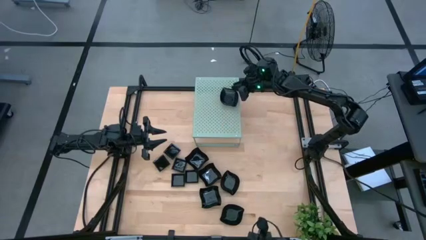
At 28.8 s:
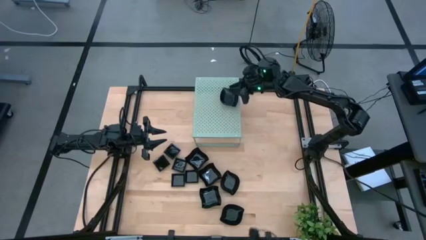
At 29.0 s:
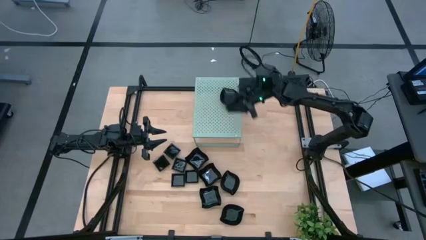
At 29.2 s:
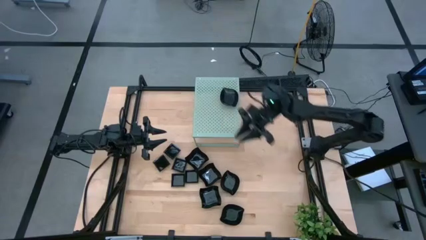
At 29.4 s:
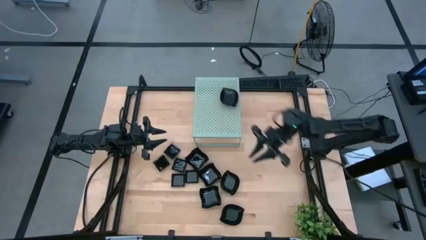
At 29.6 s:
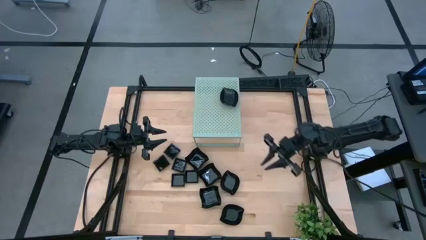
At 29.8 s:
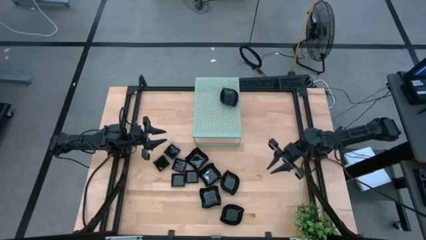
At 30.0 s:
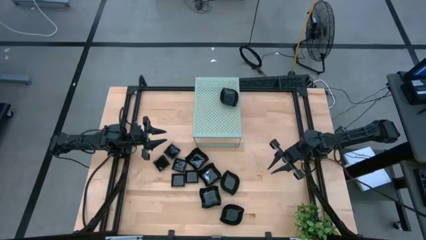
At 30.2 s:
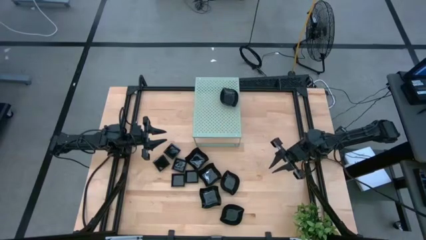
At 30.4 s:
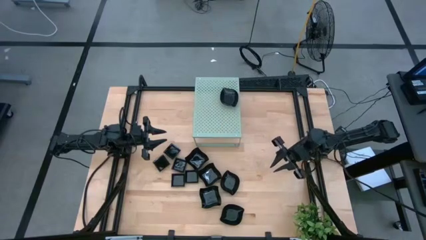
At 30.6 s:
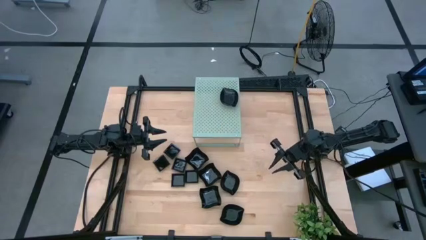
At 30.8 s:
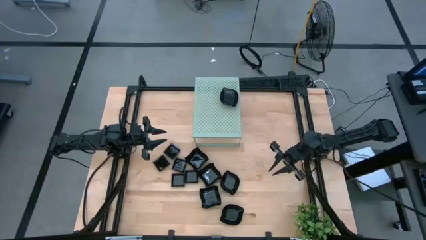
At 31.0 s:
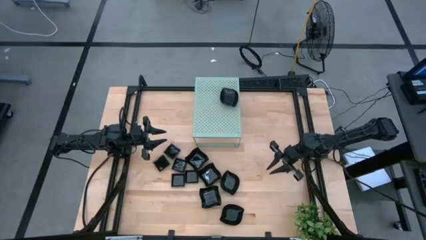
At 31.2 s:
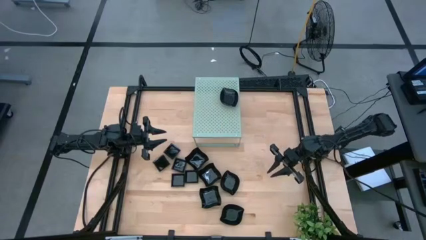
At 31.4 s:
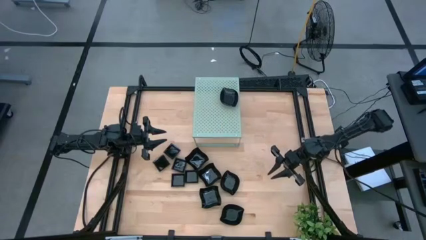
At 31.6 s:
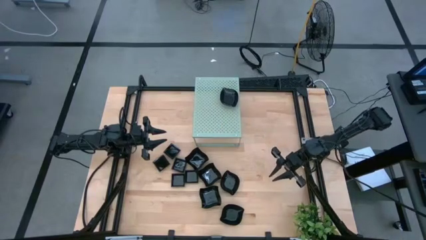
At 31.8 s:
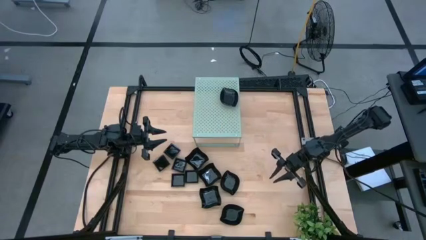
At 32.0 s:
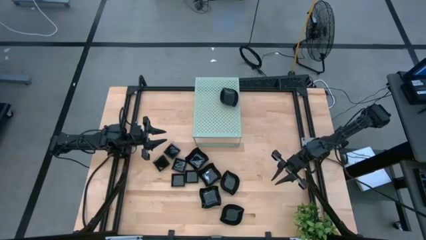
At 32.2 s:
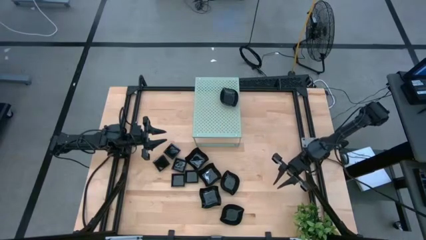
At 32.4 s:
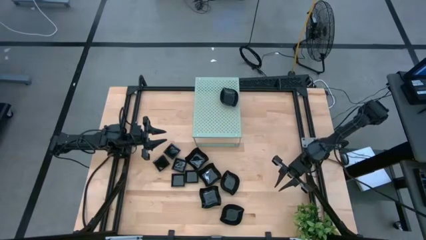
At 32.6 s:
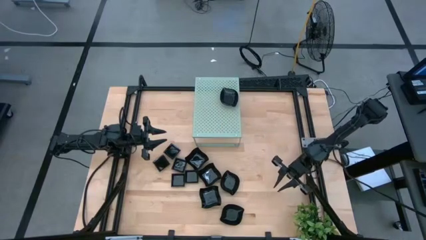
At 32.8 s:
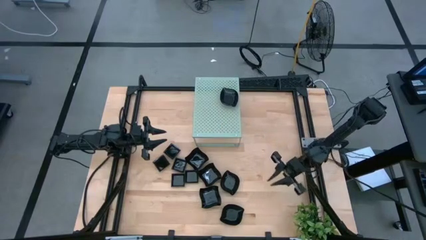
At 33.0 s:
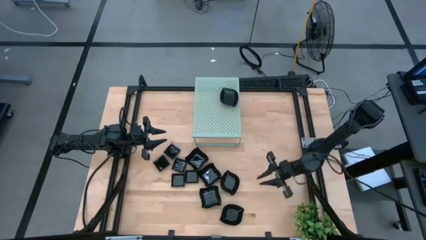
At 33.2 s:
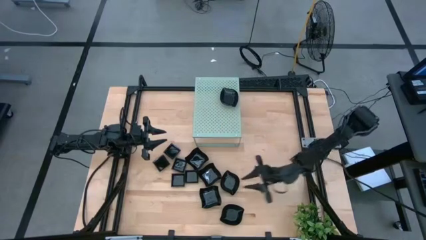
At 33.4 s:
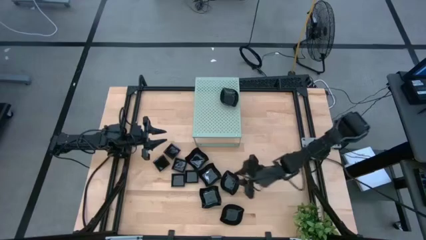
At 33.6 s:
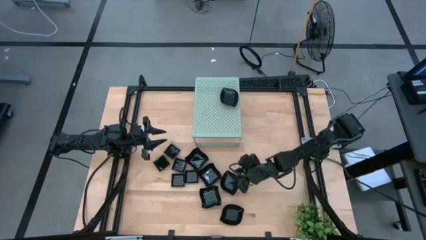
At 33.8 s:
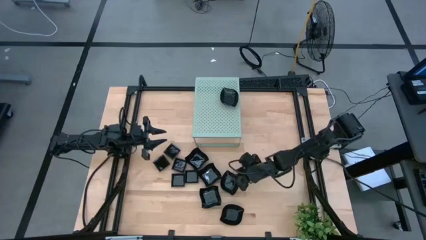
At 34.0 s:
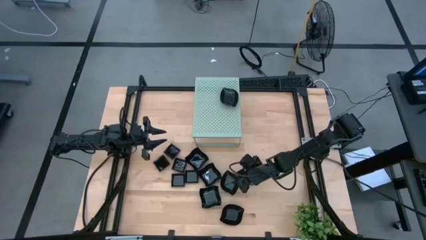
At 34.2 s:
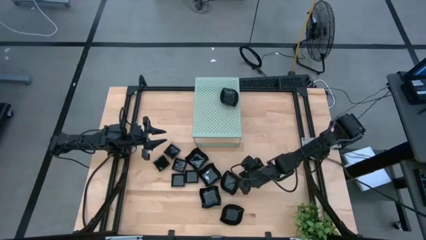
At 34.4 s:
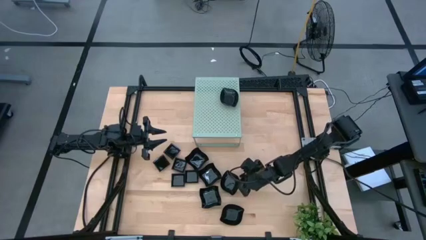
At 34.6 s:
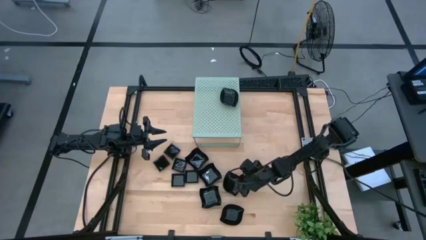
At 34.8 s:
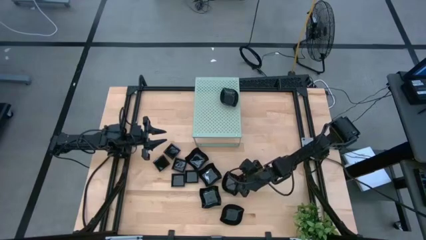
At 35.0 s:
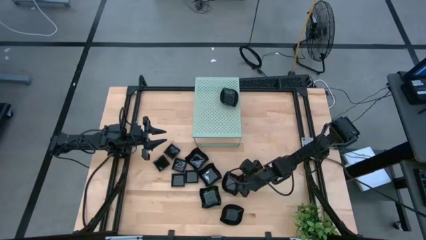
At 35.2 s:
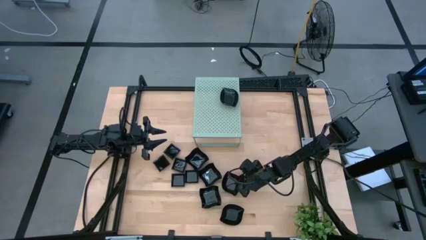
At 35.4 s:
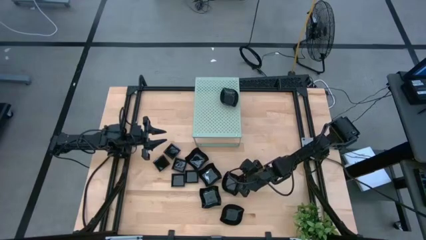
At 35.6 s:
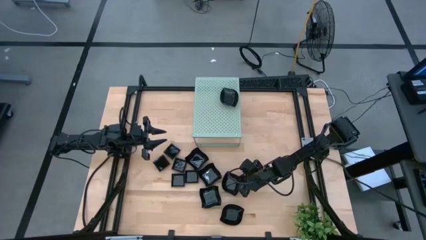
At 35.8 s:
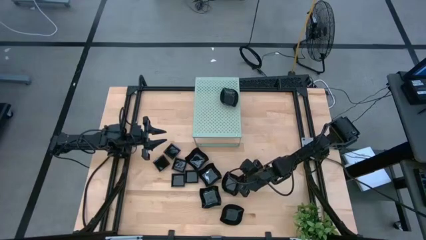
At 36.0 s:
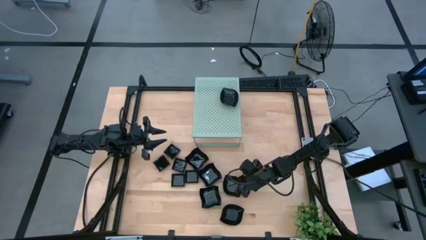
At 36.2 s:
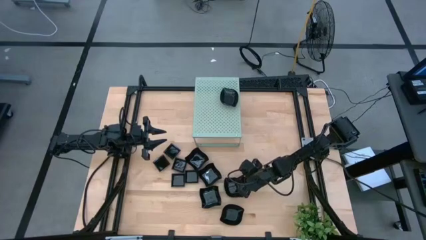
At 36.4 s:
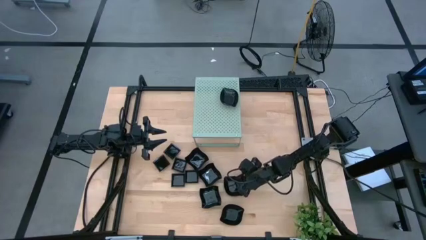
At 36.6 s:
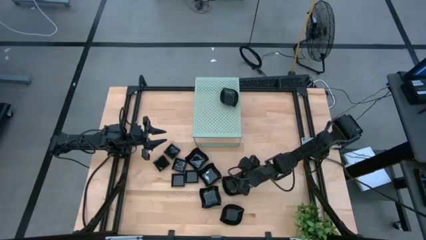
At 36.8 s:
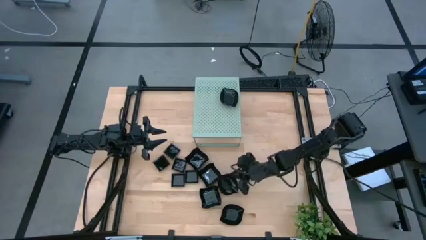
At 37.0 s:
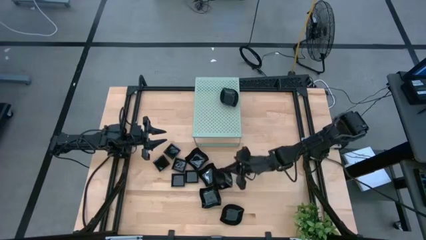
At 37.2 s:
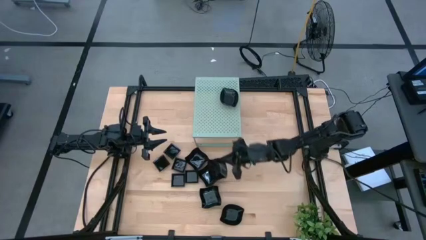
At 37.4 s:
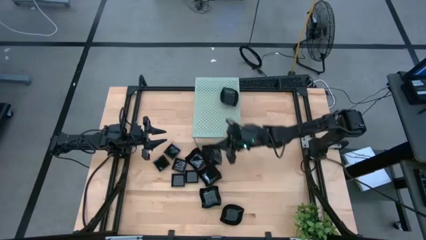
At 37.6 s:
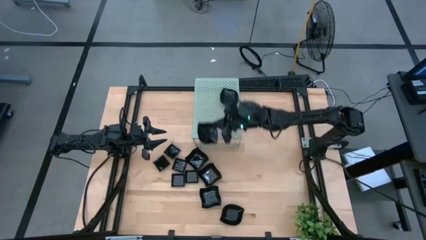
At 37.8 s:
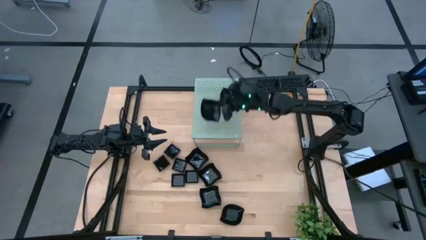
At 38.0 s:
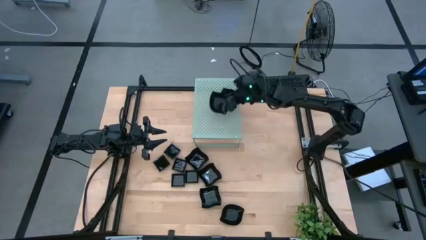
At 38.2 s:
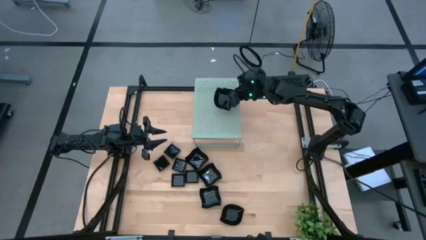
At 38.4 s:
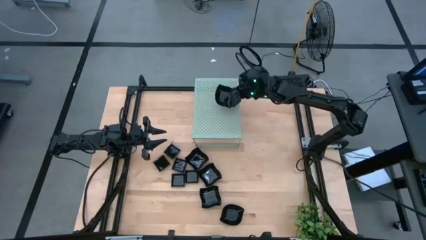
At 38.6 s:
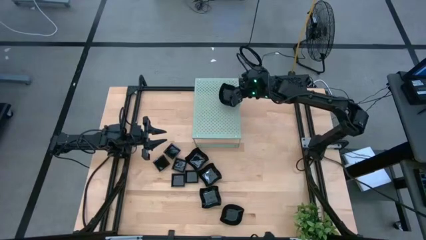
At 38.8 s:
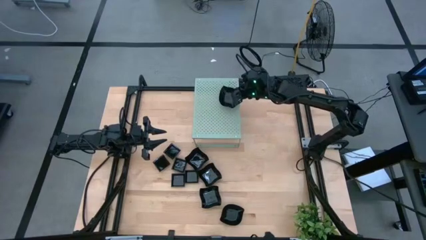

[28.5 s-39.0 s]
Task: Pick & Place Mini shaped plates
Stack the black leaf-shaped plate on top of the other leaf-shaped plates on the shelf

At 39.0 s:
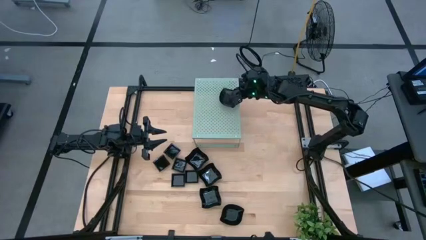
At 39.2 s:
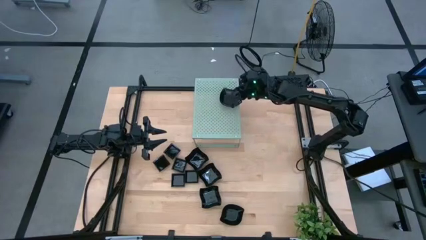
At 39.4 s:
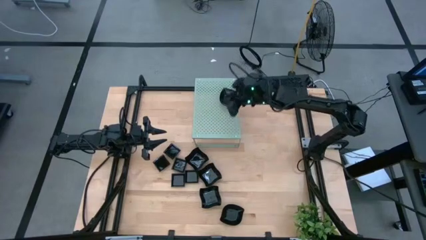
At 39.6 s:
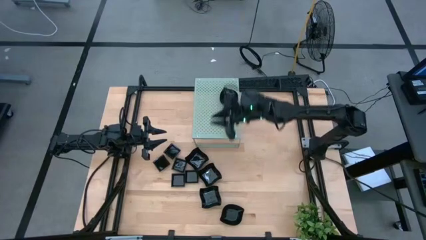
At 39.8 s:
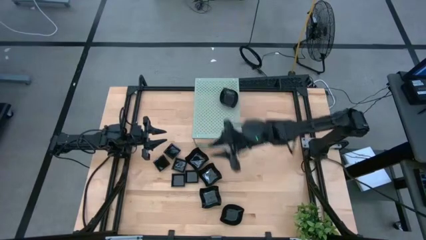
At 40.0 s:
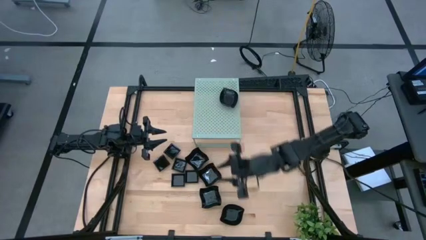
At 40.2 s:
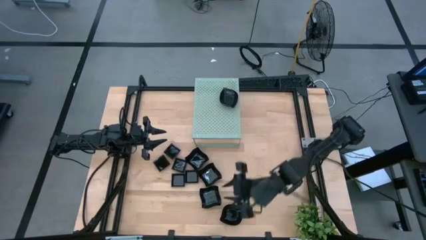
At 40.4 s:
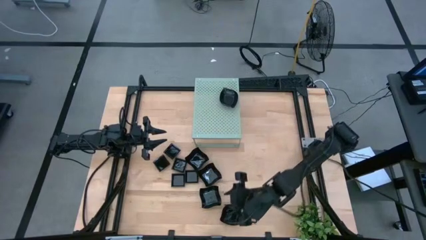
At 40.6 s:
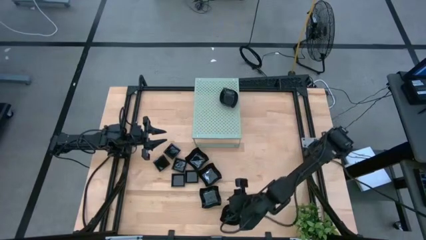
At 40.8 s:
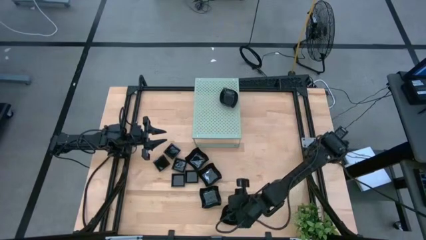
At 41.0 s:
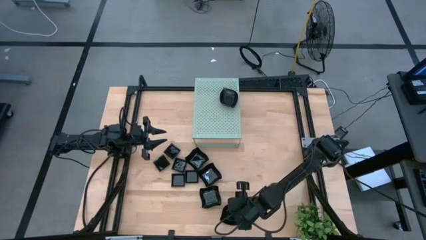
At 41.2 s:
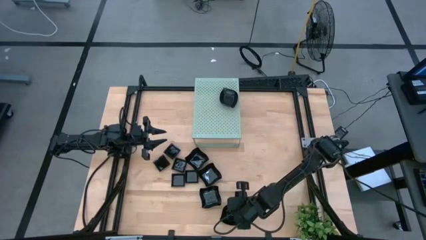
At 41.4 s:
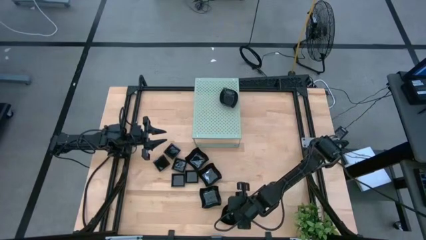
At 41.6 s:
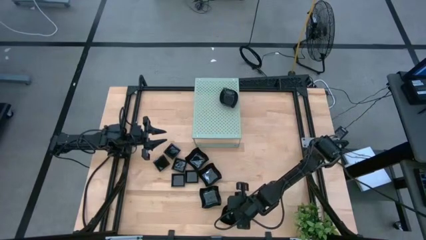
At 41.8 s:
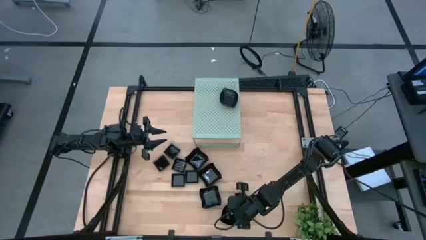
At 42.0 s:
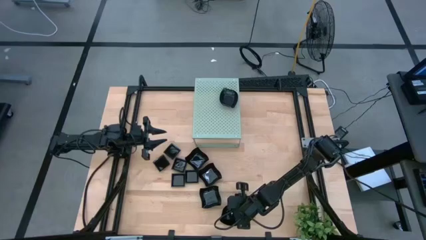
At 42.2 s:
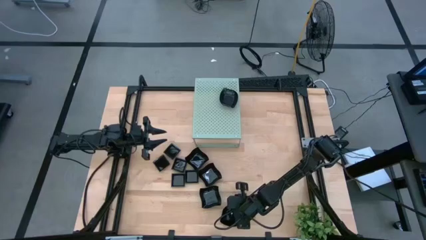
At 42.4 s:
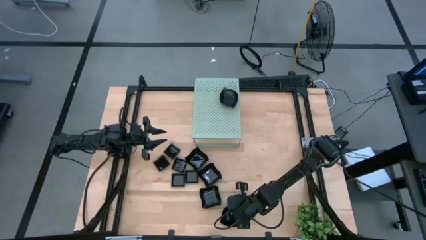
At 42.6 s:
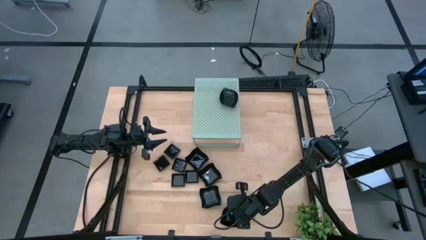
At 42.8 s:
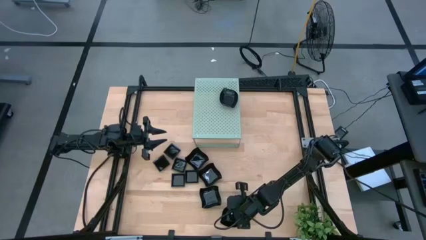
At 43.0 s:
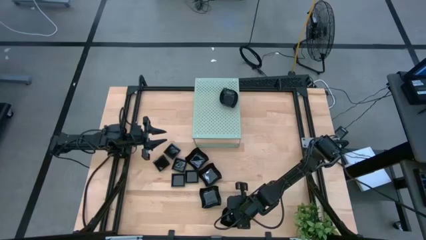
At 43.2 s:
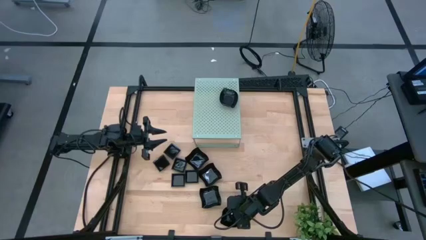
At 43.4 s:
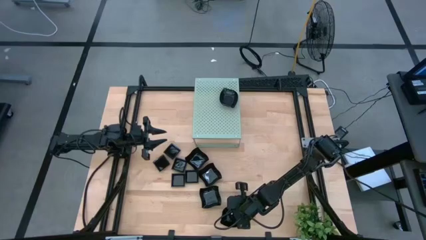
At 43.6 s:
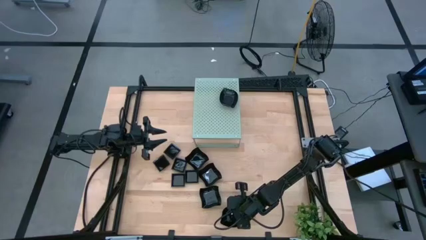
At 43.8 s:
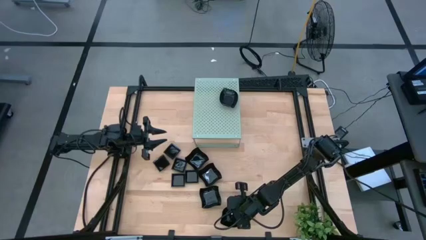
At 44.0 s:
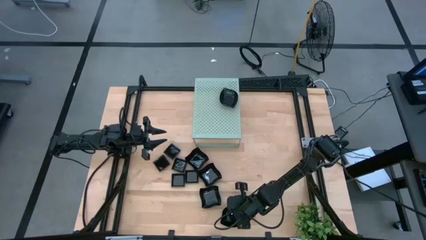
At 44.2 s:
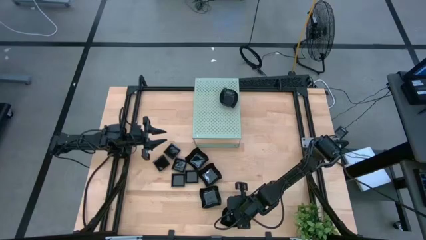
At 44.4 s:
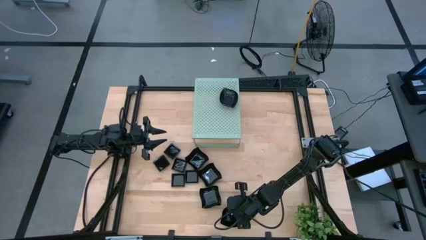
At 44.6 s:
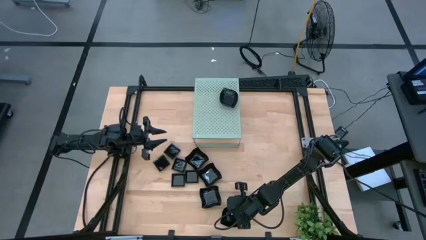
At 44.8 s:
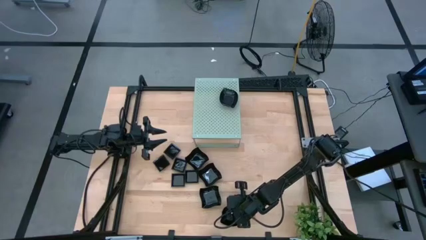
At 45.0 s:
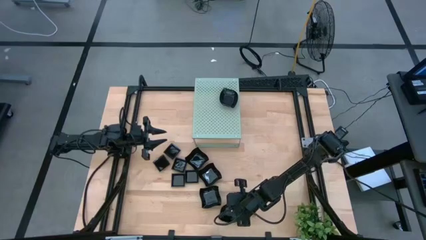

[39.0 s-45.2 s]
Stack the black leaf-shaped plate on top of the other leaf-shaped plates on the shelf

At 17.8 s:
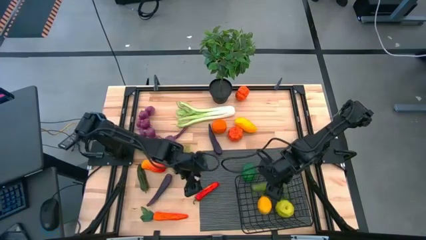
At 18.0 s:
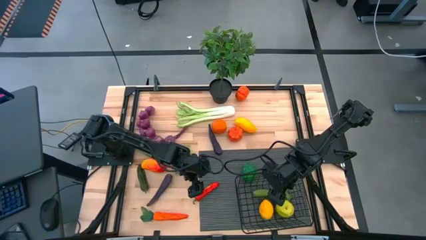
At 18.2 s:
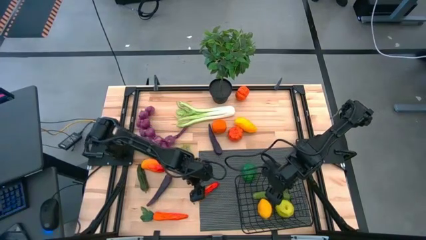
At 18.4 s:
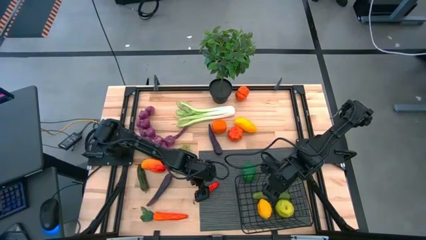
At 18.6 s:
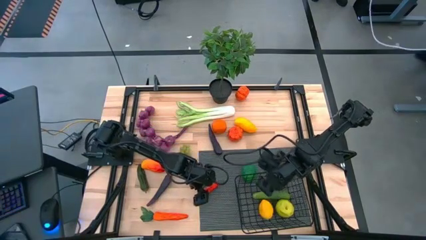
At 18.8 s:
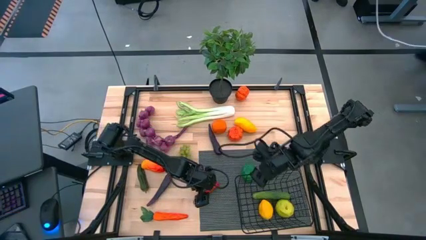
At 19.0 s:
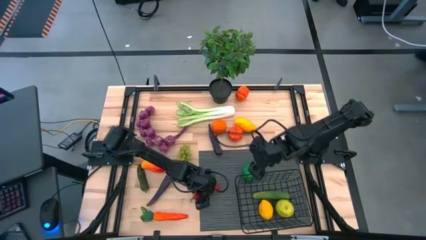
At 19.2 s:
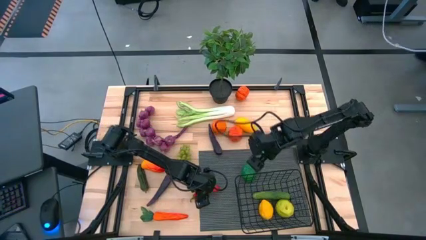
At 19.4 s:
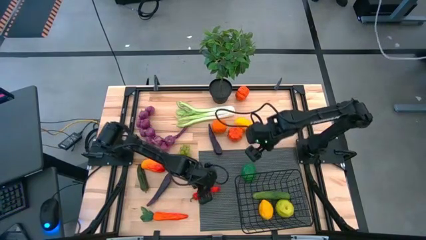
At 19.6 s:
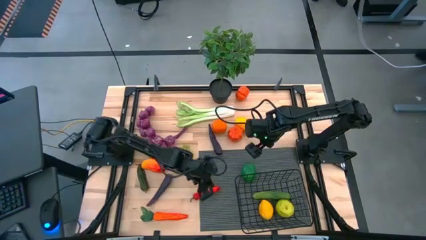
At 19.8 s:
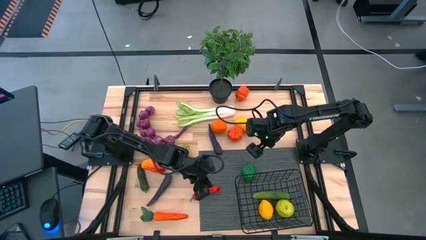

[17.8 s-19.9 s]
Task: Build produce basket
Put the red chili pepper into the black wire basket
